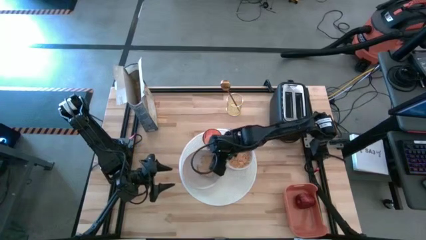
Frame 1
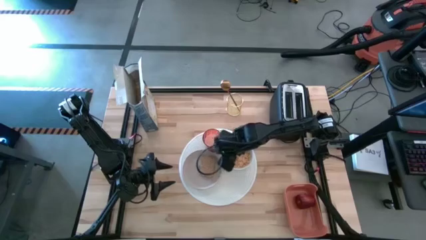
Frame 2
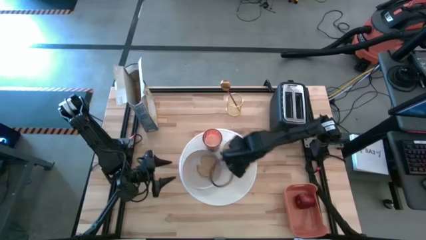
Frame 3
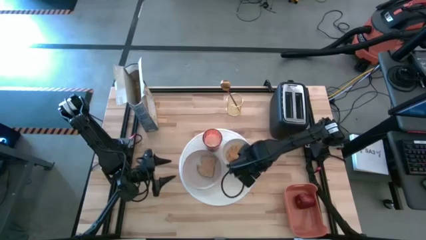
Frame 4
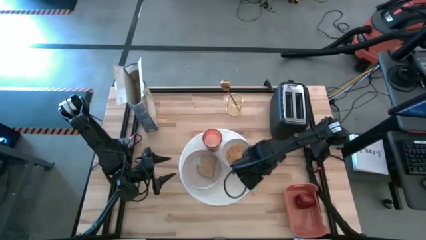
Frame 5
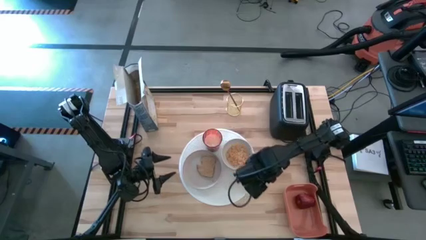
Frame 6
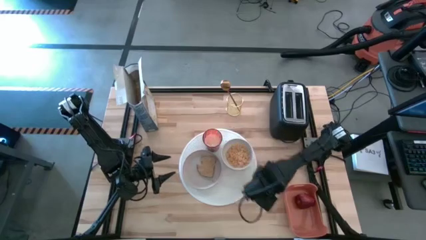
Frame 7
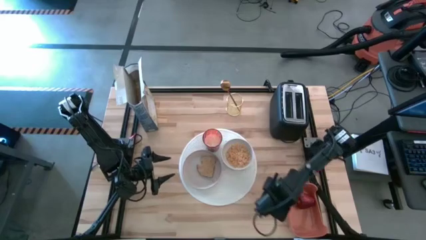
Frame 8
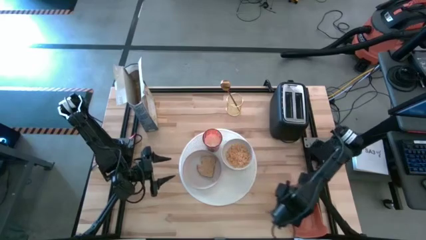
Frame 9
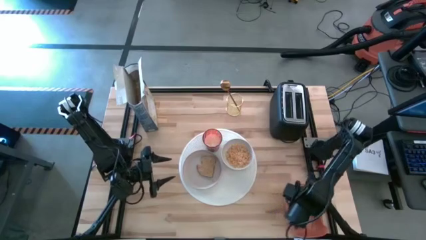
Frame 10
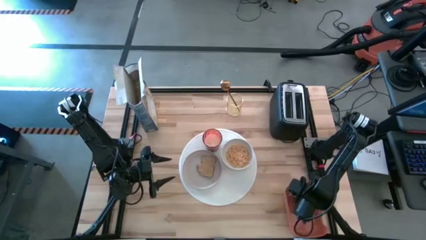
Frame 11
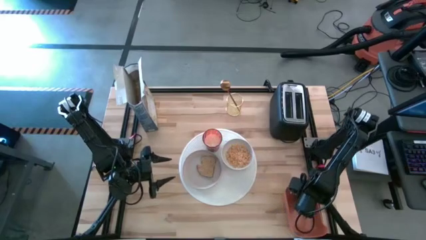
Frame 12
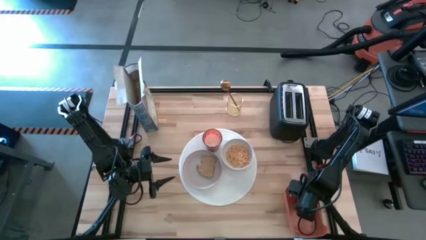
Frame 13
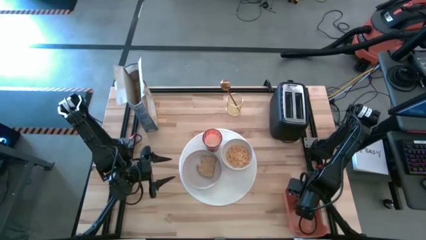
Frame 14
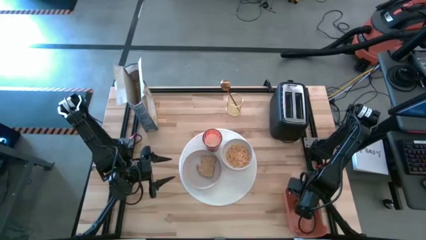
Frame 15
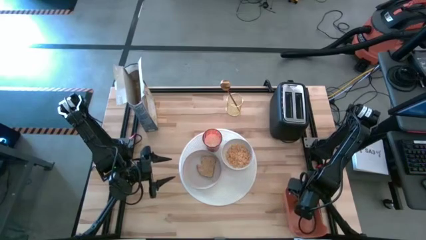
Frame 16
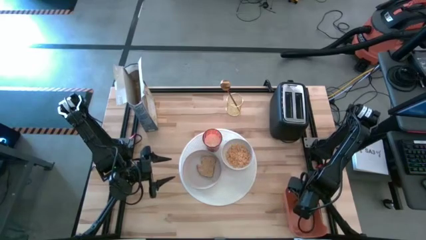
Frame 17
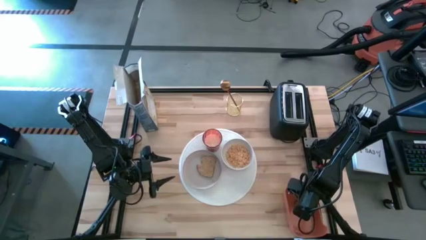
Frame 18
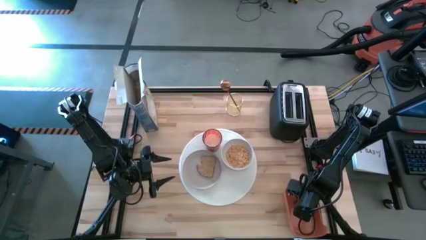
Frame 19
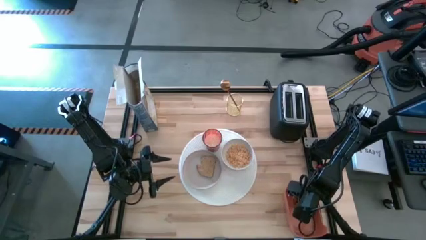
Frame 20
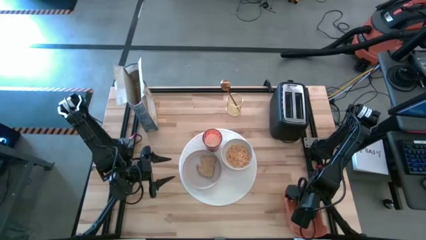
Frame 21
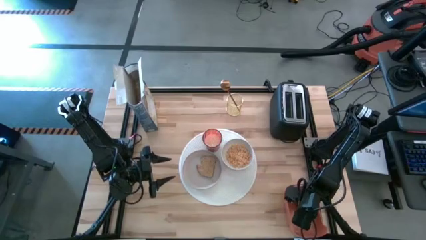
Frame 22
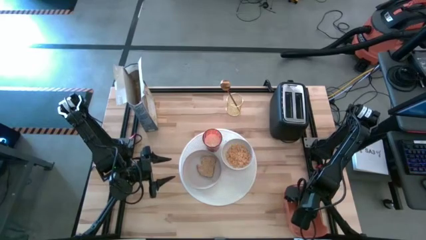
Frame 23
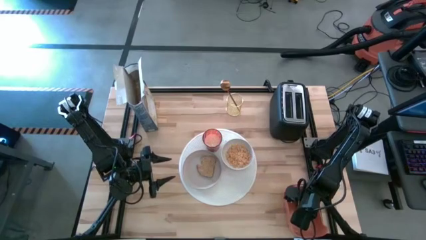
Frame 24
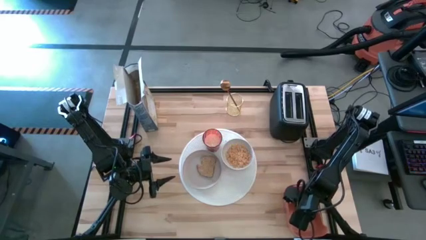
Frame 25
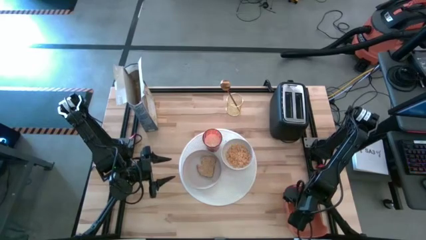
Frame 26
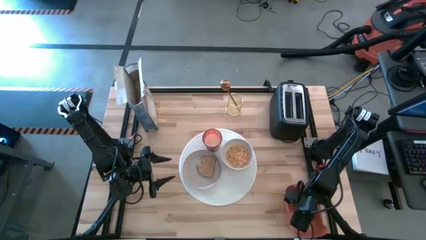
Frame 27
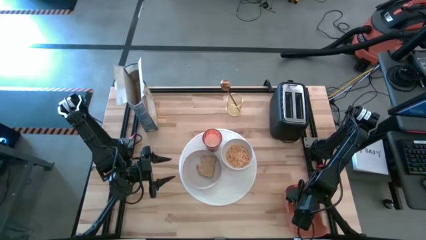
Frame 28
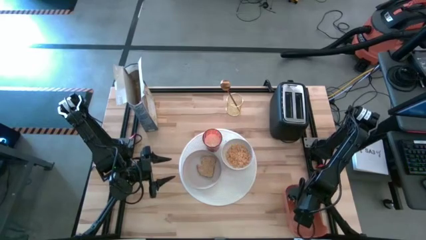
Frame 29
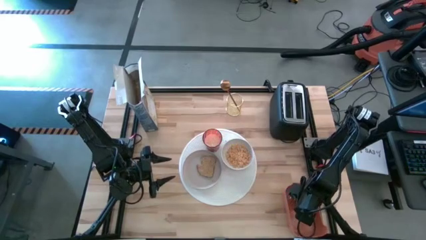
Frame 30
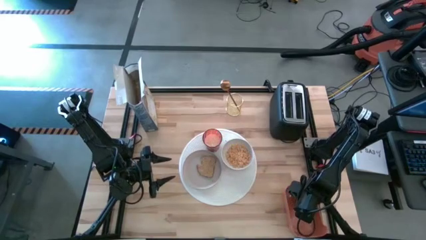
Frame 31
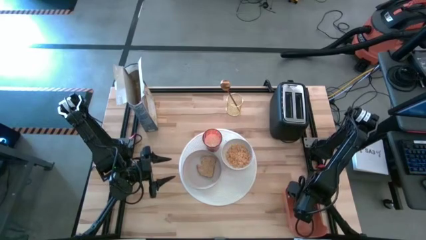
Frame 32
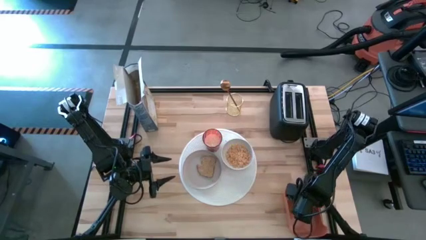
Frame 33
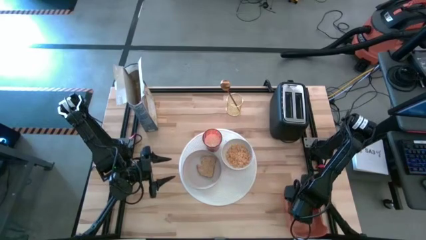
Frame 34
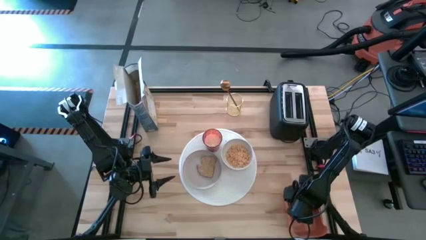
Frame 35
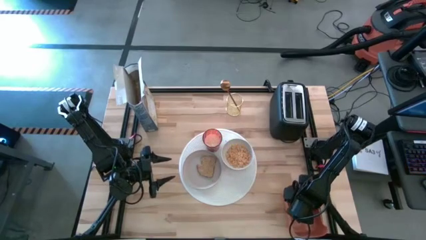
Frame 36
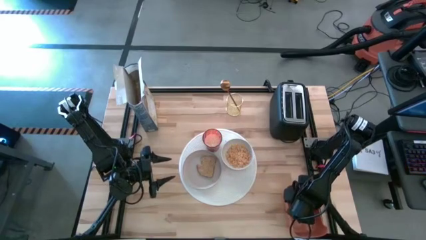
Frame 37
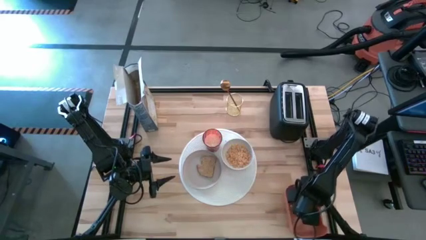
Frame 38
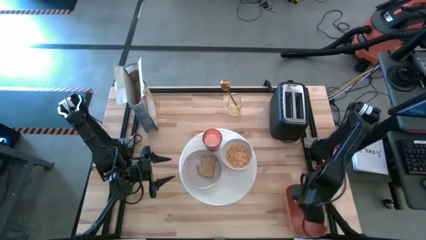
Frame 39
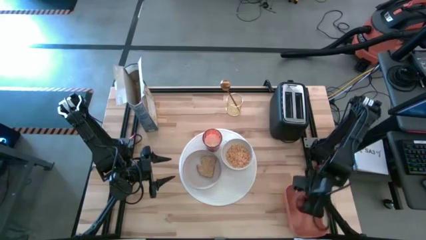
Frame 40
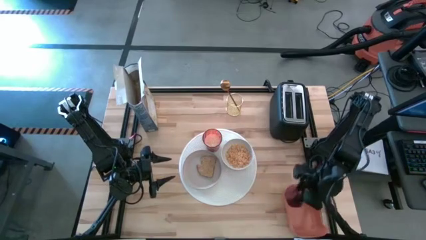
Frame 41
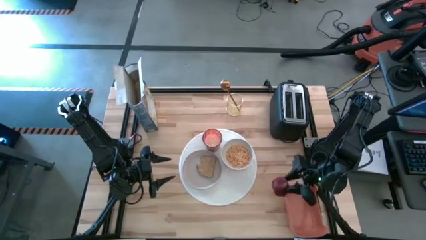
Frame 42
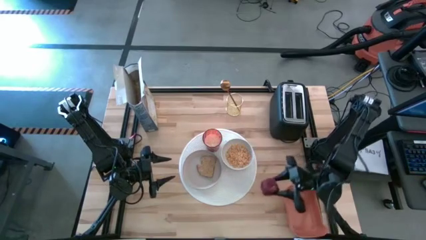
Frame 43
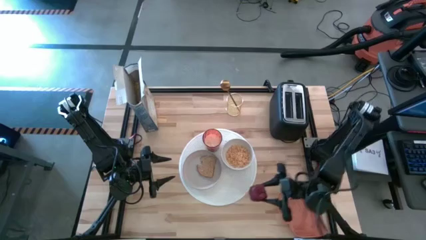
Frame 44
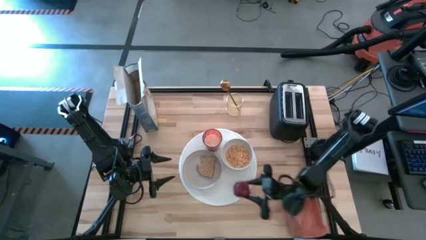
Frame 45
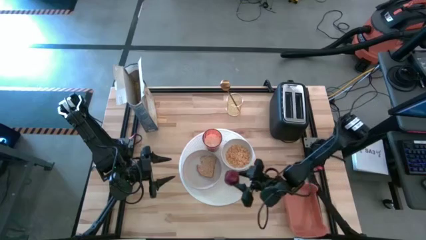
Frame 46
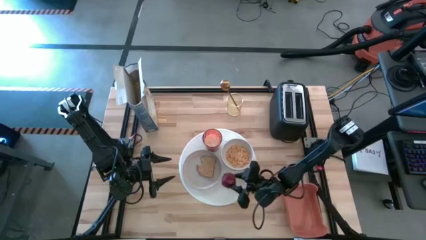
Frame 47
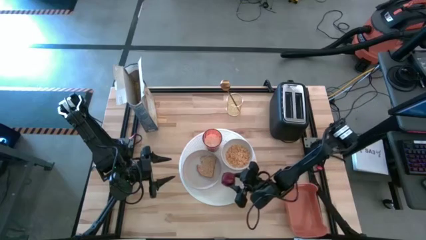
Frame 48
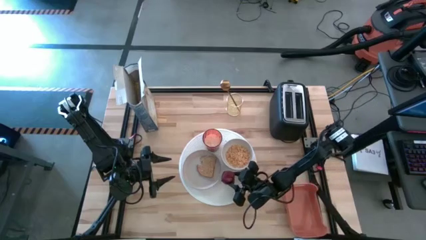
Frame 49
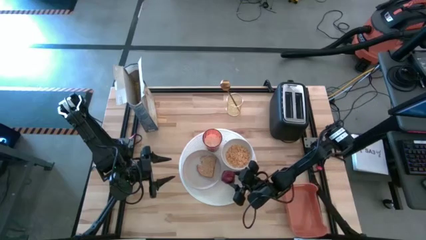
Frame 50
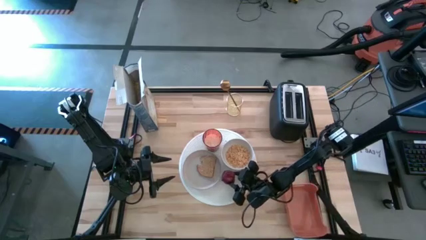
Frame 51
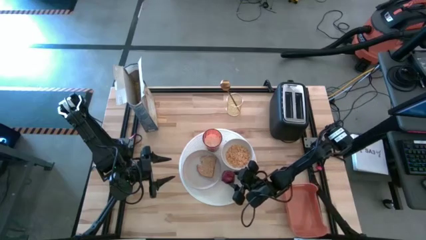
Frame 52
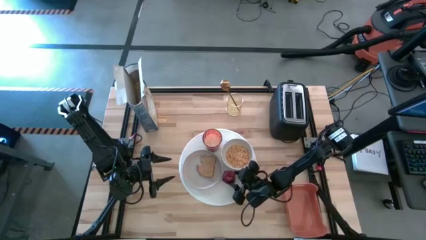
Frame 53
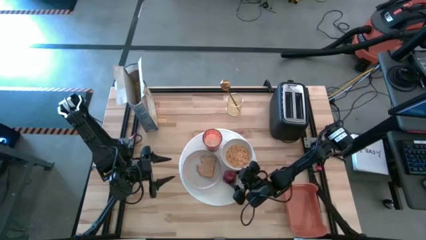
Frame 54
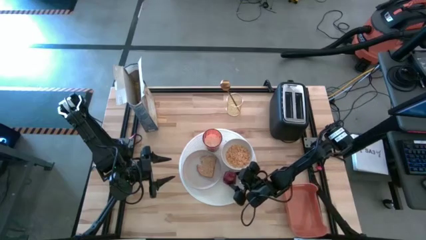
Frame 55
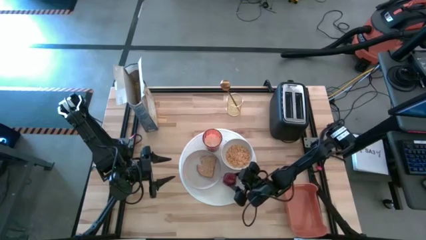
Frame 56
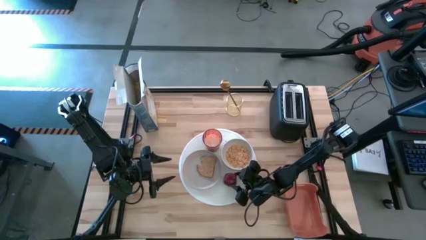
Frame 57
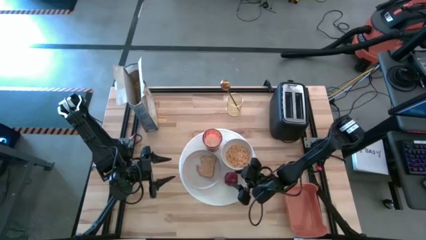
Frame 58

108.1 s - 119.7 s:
Task: Arrange a breakfast setting
Put the red apple on the white placemat to the bottom of the white bowl

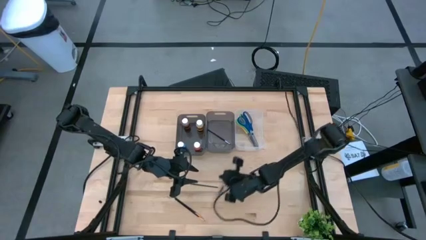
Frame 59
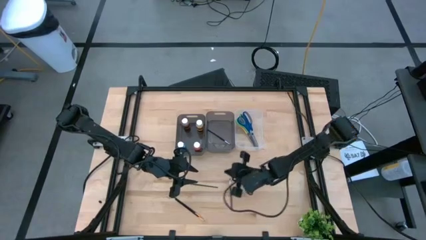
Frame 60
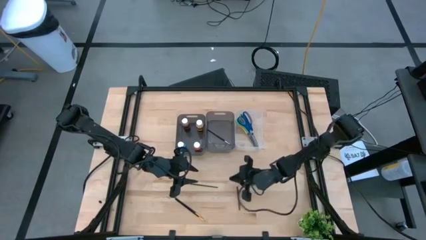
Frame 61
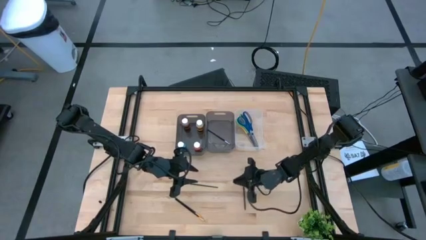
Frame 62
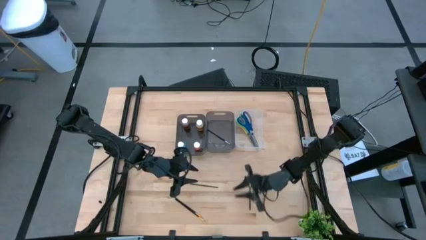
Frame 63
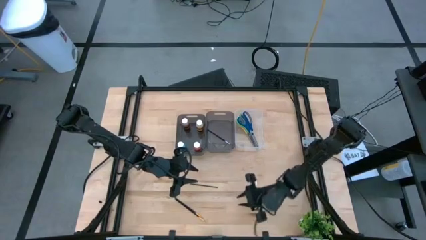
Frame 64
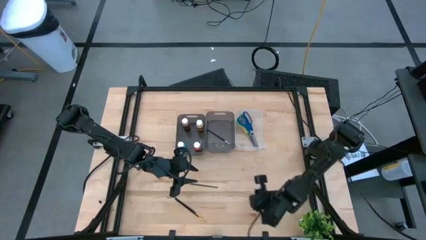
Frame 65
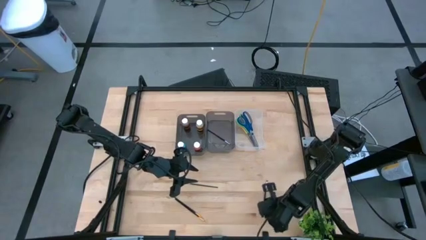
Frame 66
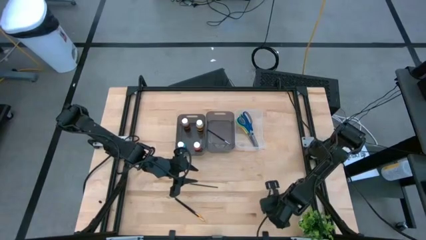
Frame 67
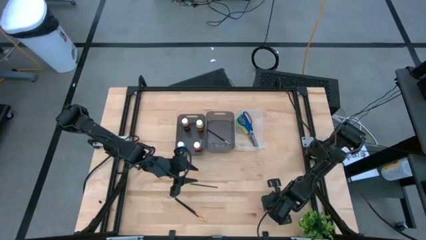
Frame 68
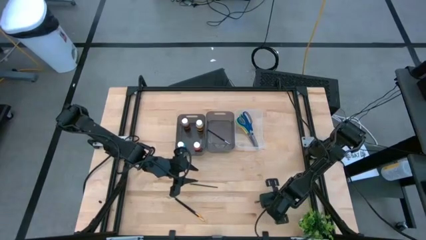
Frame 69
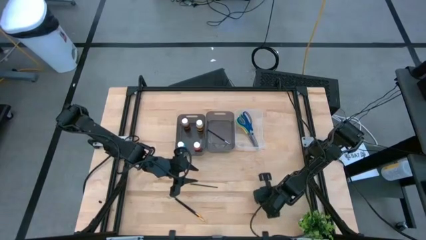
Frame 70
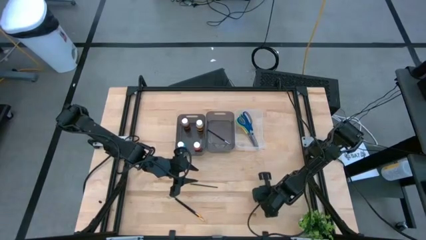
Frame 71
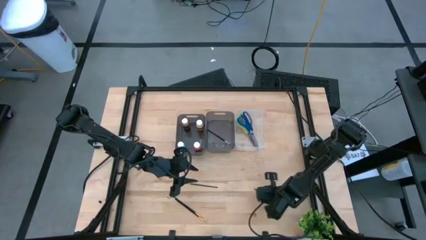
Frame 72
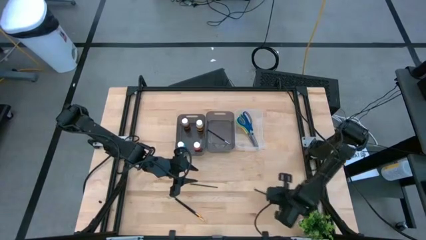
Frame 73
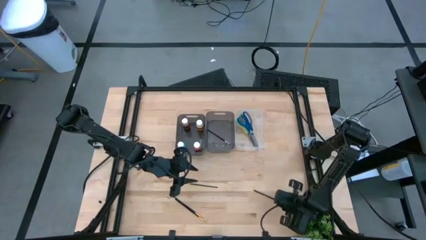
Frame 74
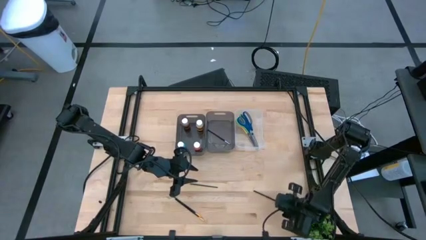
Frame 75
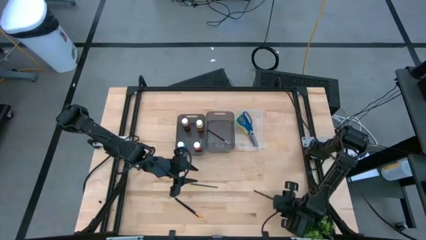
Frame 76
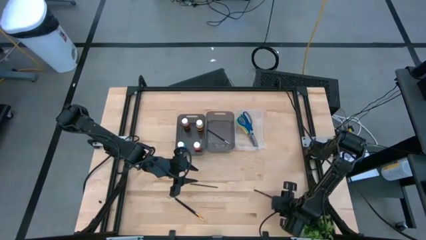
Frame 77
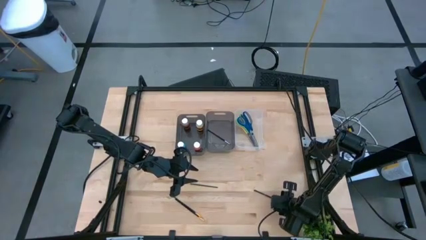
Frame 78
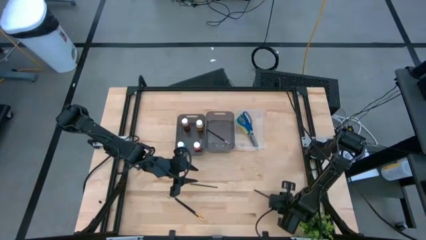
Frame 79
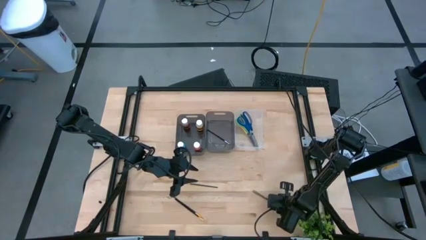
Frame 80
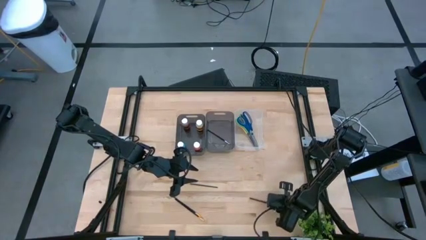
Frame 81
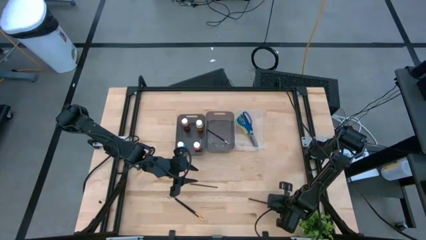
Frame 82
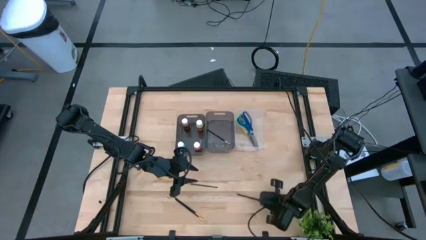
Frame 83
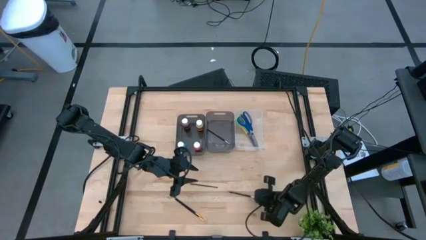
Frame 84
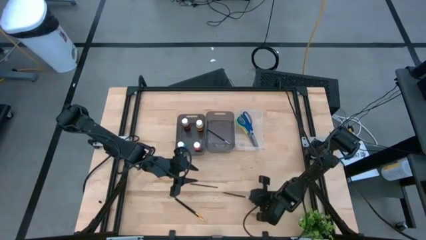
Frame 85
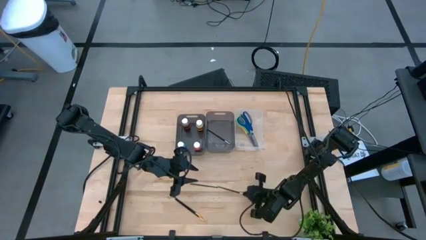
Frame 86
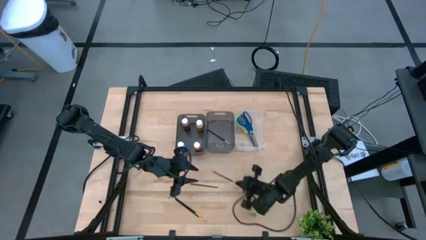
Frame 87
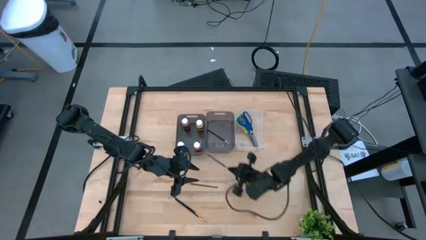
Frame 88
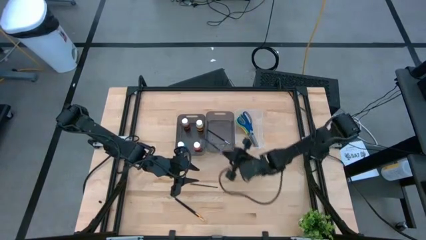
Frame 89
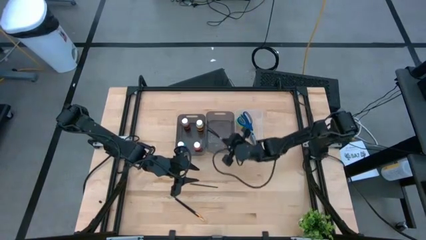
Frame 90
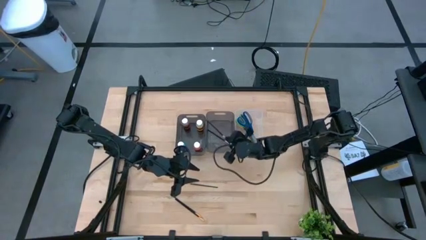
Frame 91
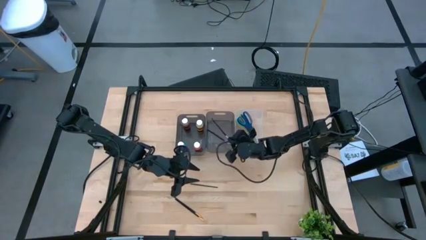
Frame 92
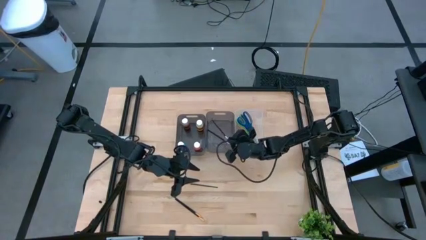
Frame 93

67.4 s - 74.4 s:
Task: Pick & Place Paint Supplies
Put the silver paintbrush into the right black bin
